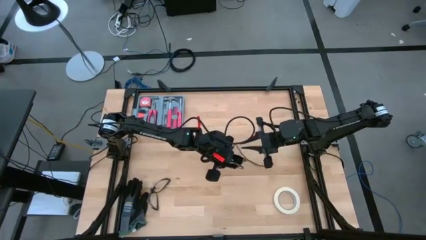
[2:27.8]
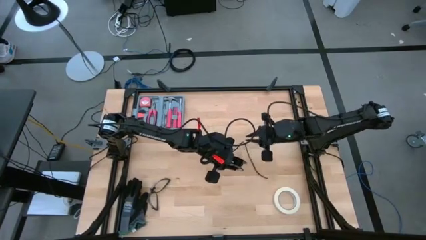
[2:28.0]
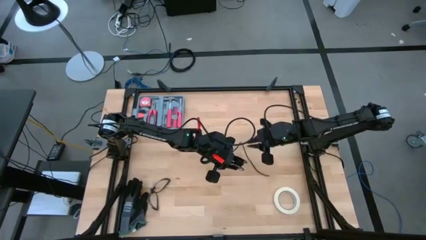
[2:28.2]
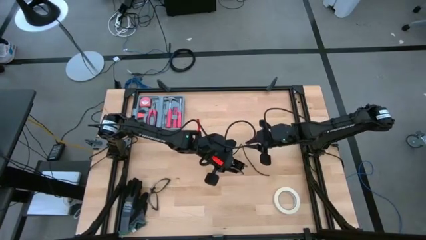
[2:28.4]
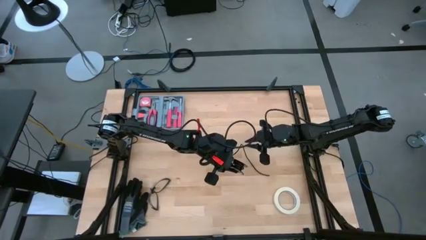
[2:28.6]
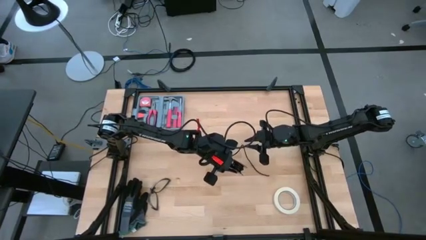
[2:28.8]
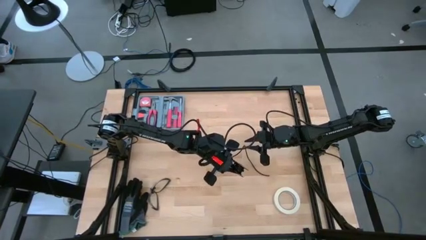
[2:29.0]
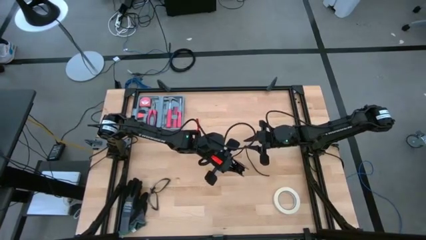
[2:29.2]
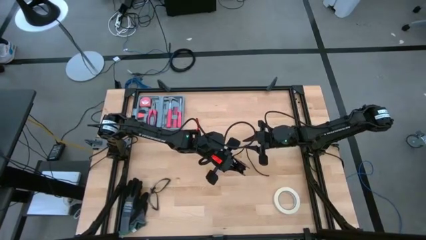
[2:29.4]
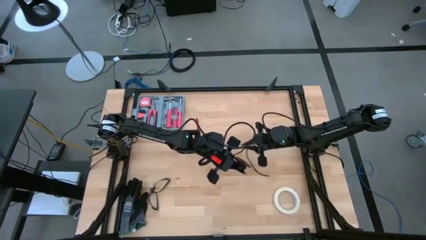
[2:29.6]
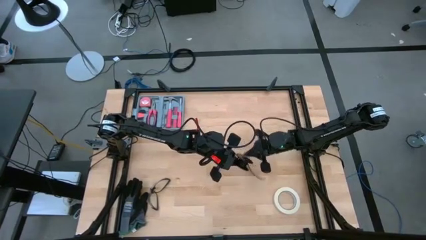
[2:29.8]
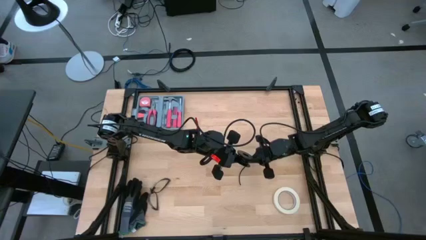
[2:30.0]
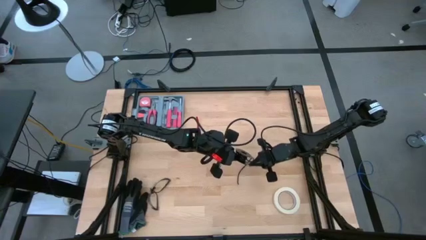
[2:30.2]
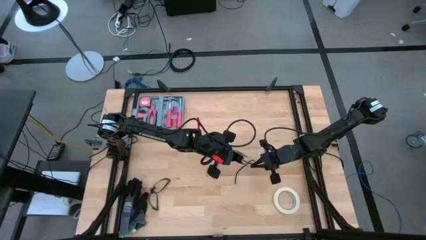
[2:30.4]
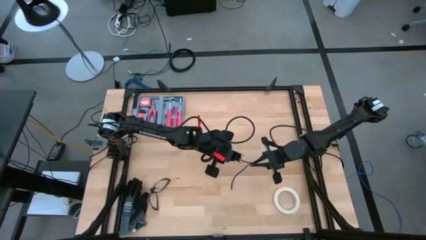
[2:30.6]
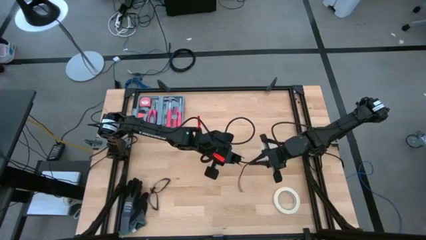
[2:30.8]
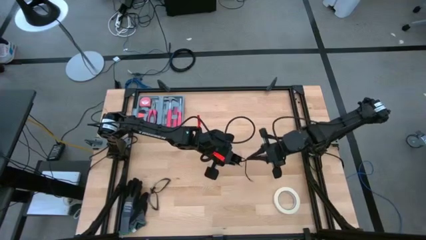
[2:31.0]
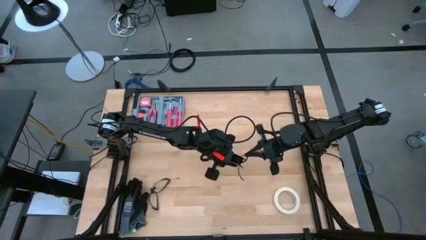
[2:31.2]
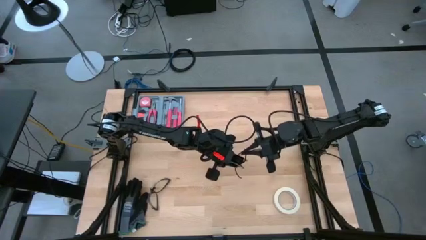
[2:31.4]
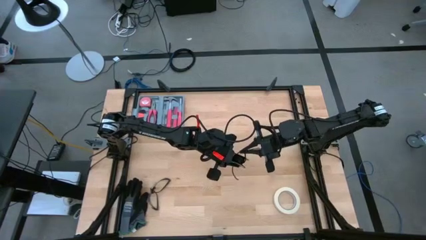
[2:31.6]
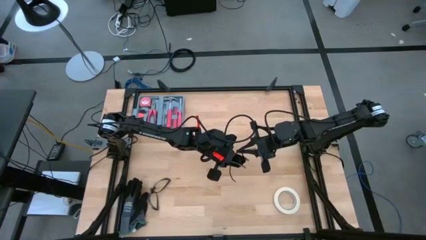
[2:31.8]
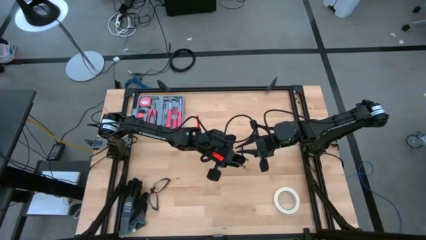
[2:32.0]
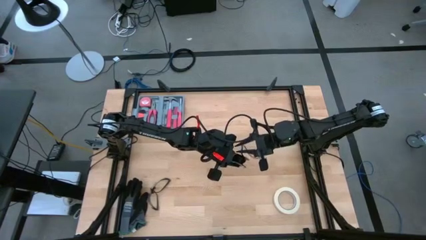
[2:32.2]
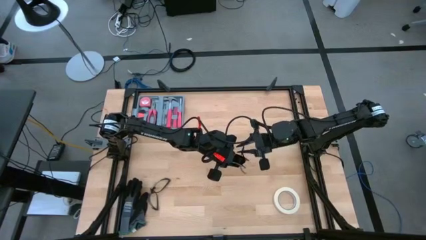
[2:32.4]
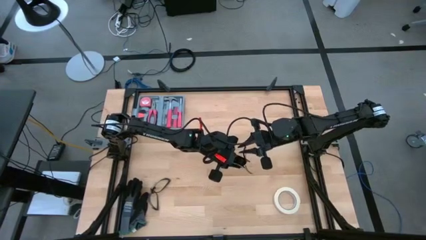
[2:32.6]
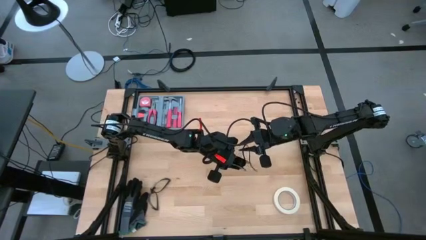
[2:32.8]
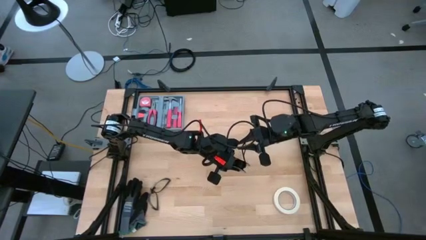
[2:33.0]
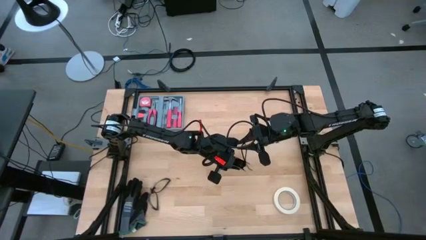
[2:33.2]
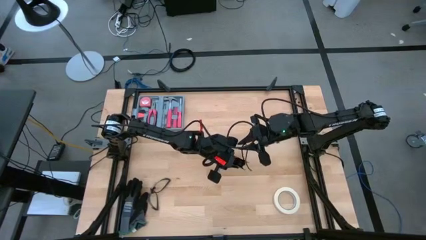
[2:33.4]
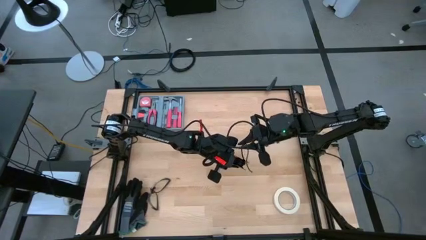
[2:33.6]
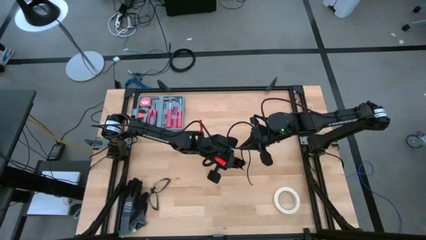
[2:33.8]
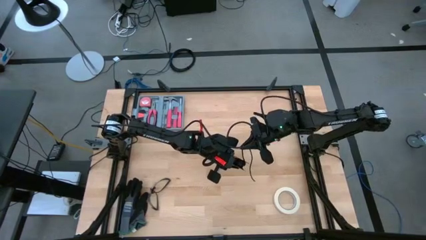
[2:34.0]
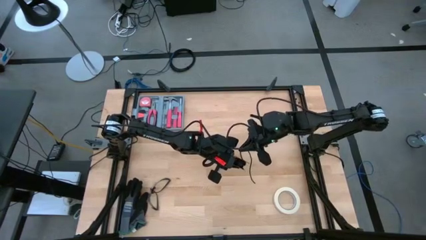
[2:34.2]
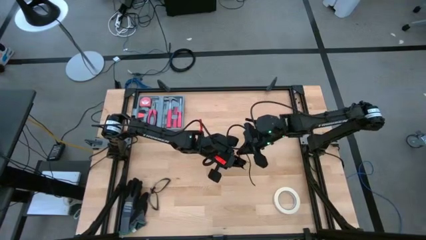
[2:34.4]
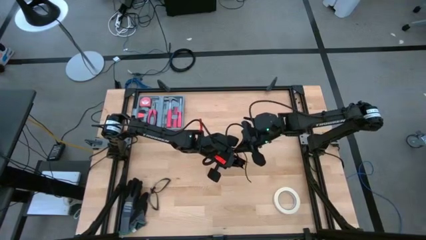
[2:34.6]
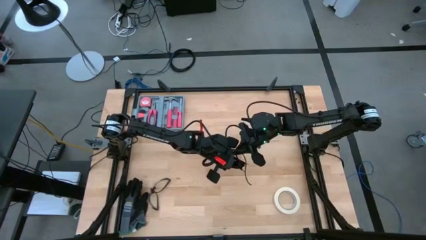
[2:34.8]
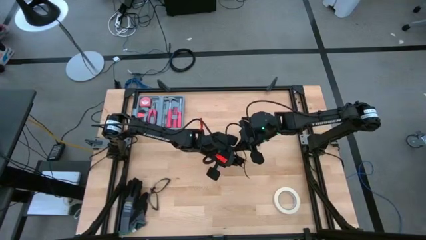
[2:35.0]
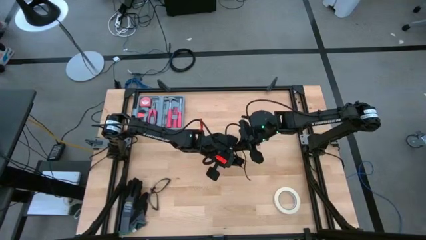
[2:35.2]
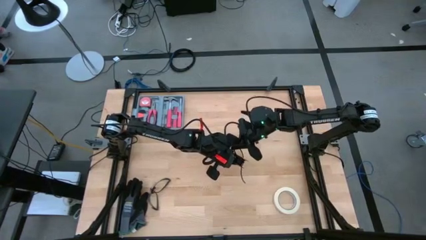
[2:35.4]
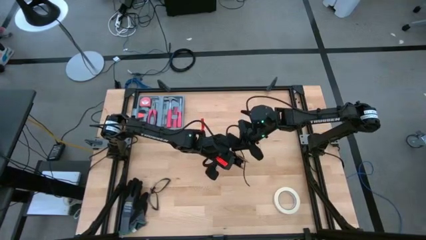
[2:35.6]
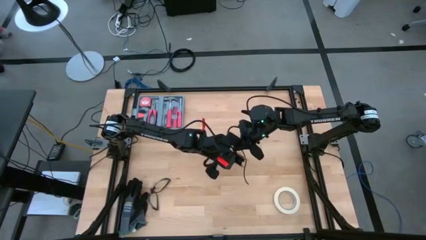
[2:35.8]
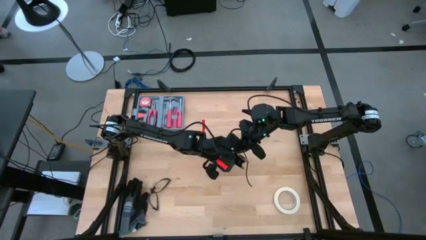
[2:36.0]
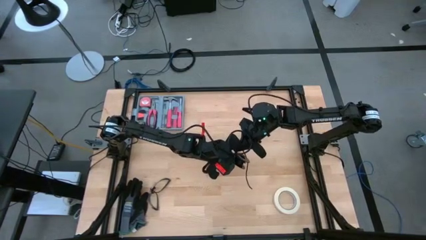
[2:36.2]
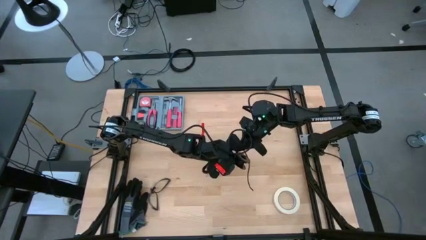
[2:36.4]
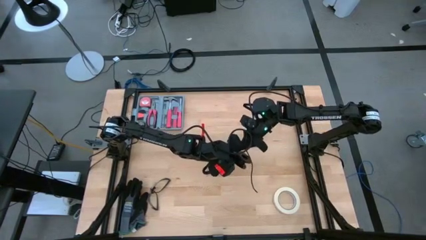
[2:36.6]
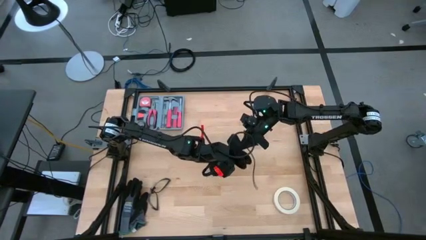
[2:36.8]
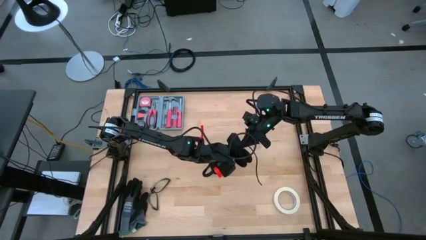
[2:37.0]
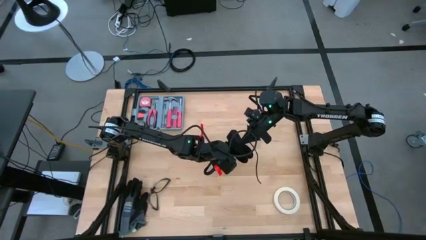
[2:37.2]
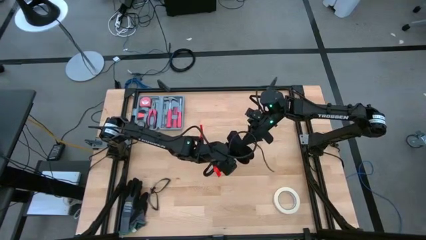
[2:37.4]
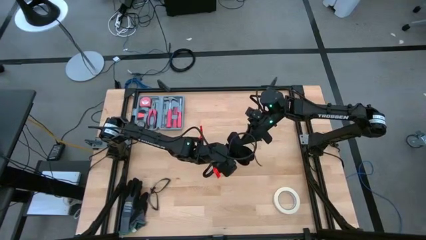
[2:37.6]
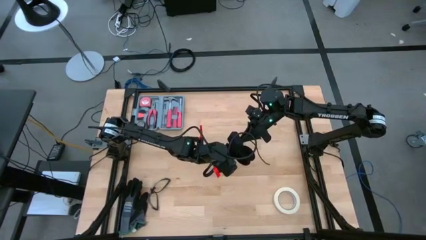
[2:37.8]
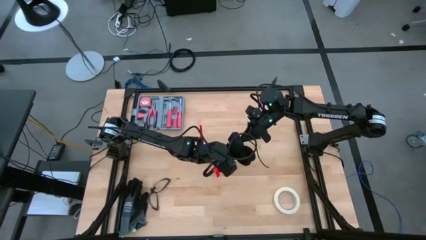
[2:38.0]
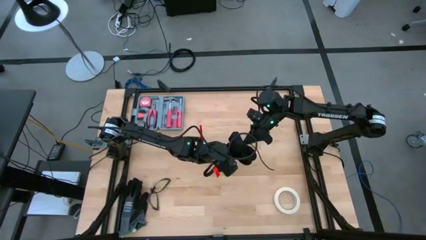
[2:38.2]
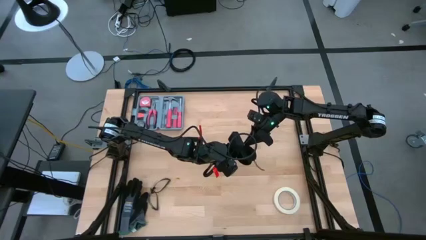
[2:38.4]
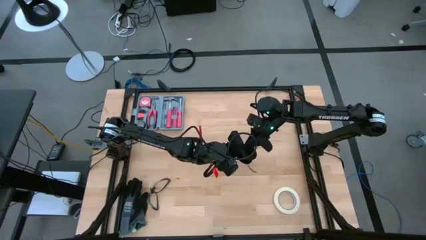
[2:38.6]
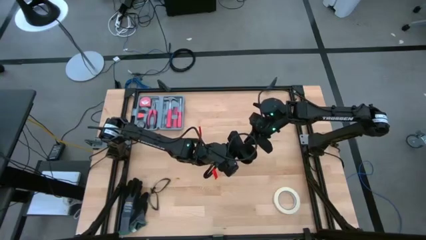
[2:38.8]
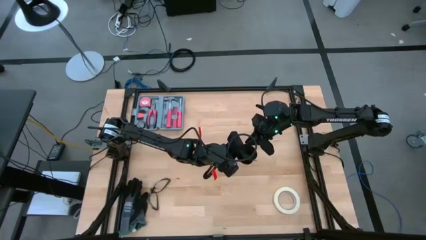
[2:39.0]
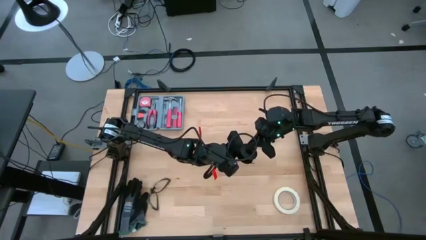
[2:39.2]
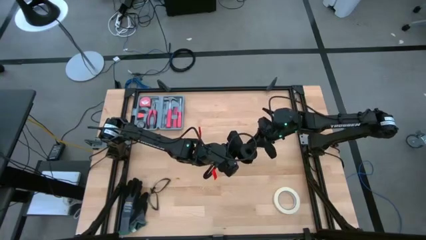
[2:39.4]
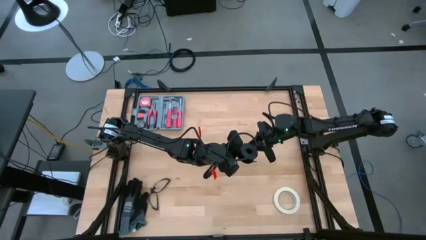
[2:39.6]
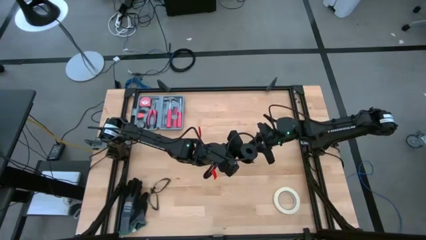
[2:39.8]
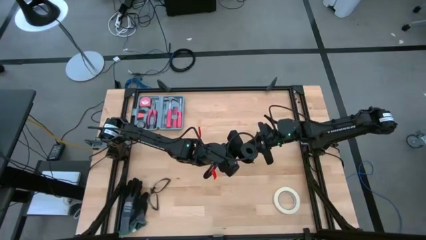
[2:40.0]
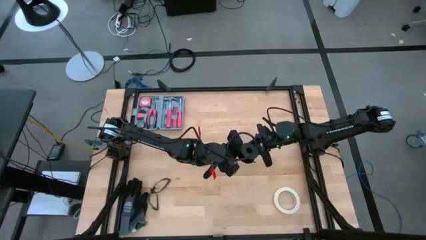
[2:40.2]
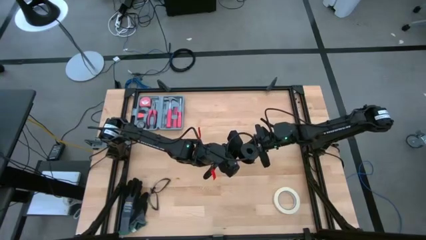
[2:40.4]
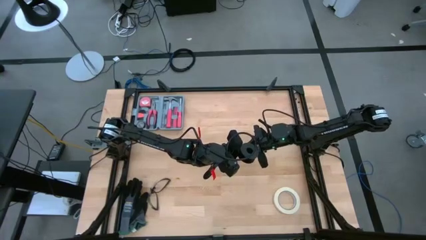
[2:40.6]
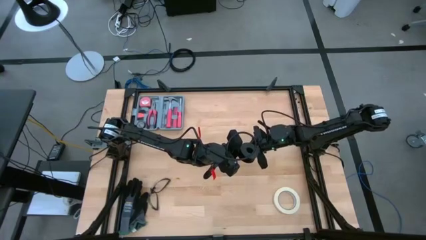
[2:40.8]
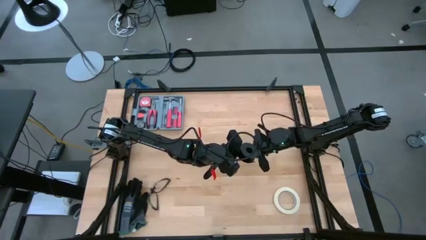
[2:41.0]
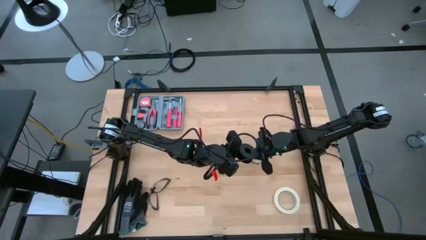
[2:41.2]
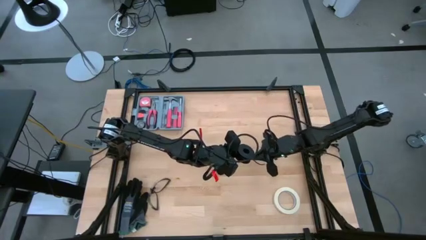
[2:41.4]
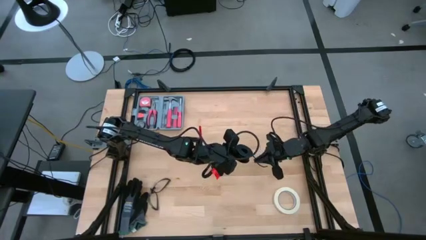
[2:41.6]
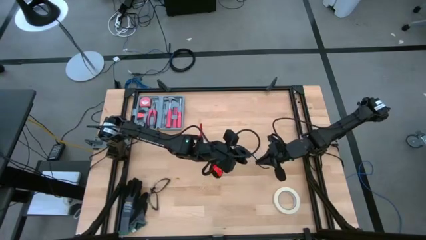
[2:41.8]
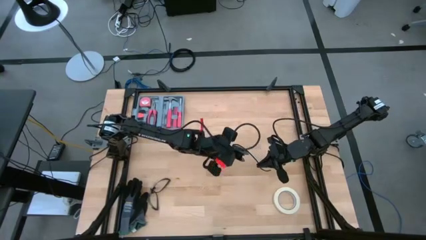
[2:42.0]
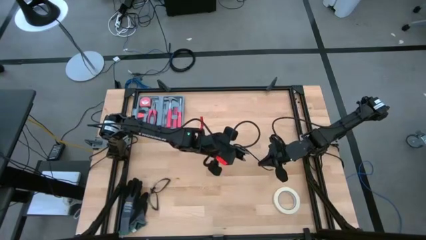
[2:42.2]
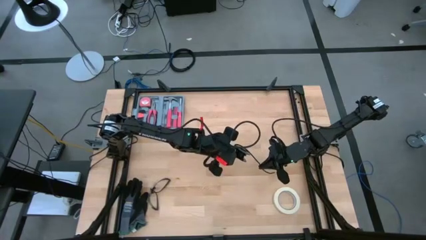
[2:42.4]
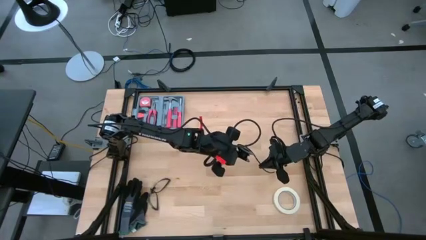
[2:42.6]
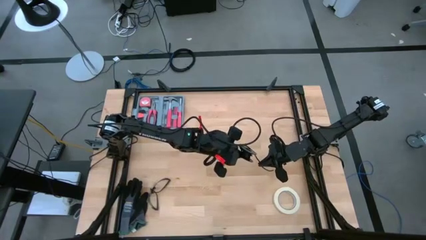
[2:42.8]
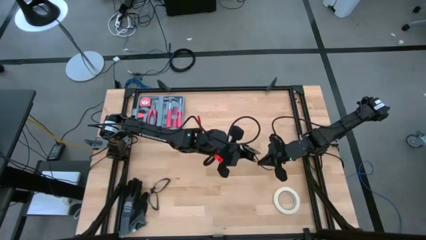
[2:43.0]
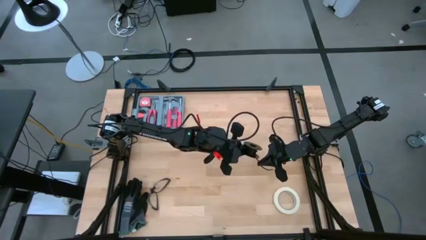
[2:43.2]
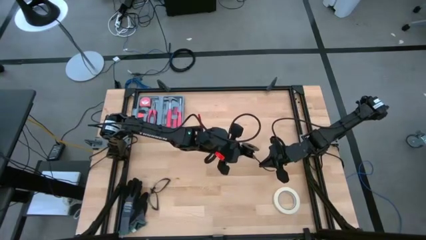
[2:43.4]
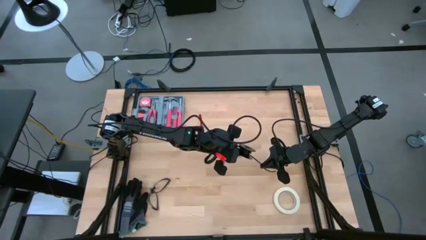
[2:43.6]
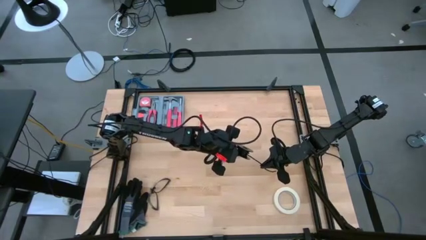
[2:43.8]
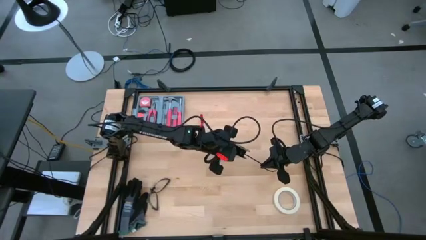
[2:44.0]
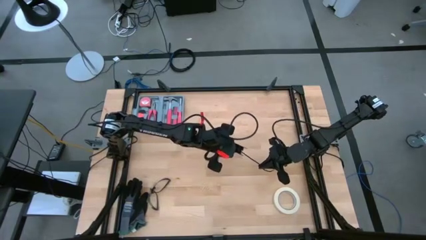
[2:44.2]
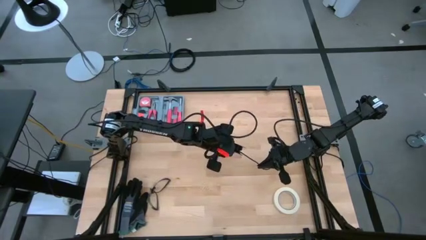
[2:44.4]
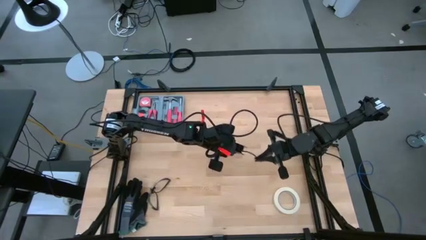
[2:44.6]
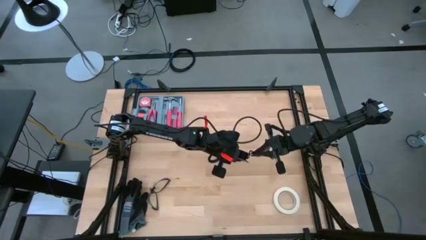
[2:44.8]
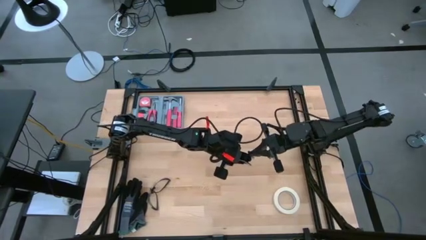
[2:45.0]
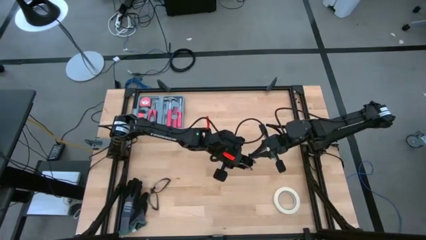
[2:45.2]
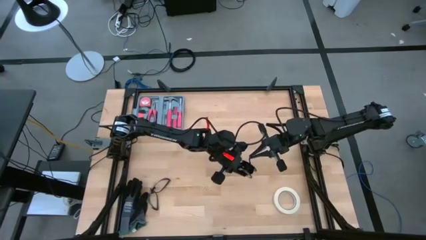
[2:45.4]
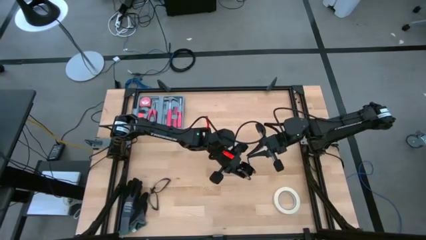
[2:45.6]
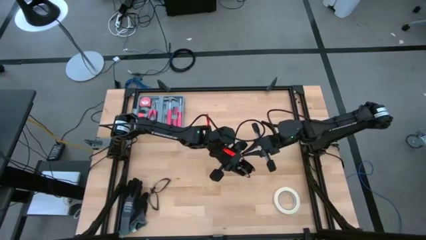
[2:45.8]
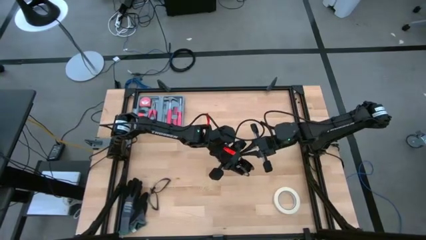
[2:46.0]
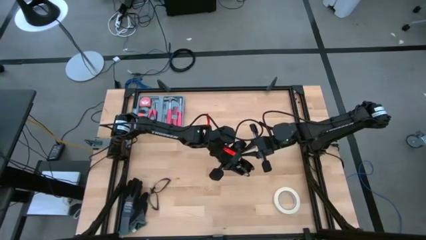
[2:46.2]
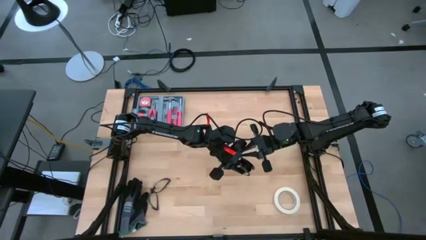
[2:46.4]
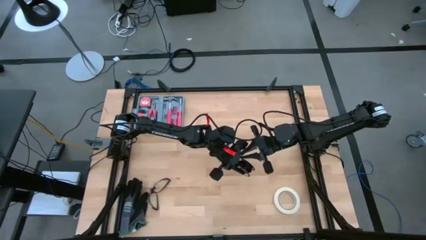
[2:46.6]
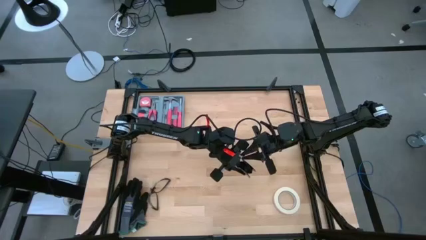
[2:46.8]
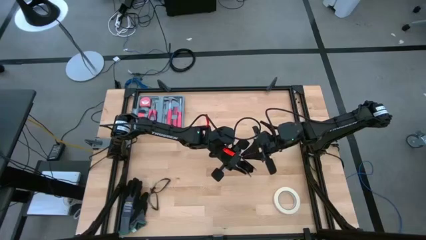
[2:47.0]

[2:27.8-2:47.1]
Task: Coil cords
Coil the black wire onto the spool
